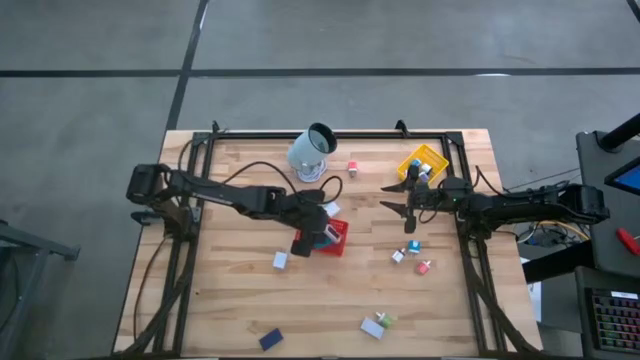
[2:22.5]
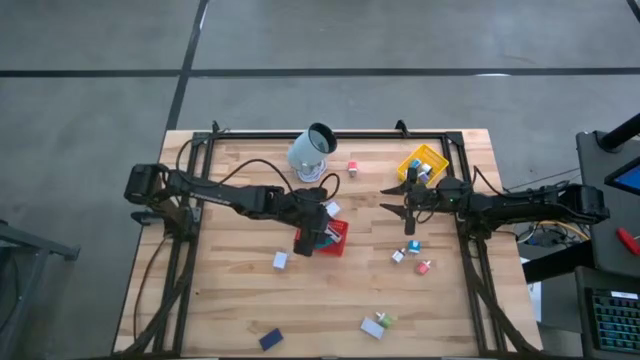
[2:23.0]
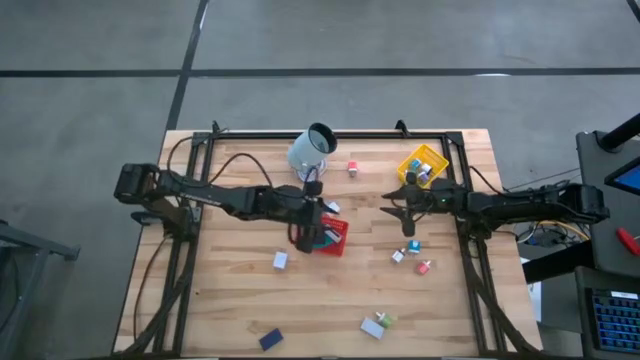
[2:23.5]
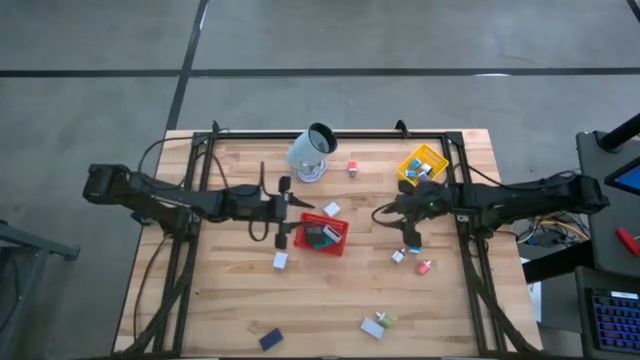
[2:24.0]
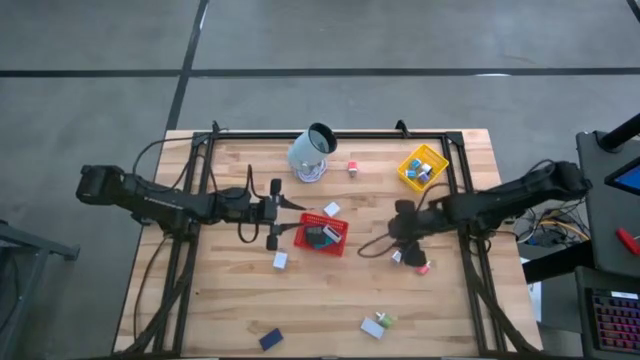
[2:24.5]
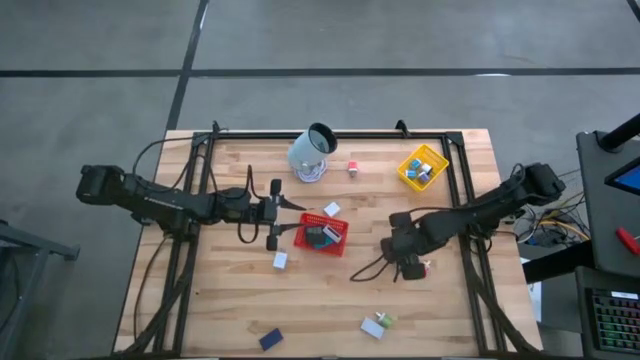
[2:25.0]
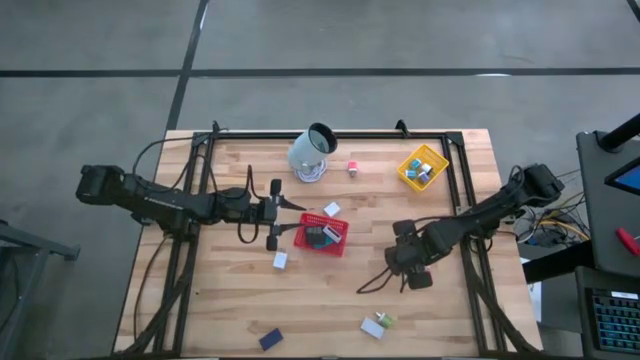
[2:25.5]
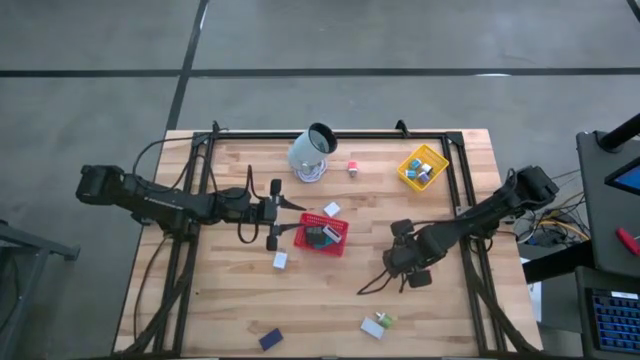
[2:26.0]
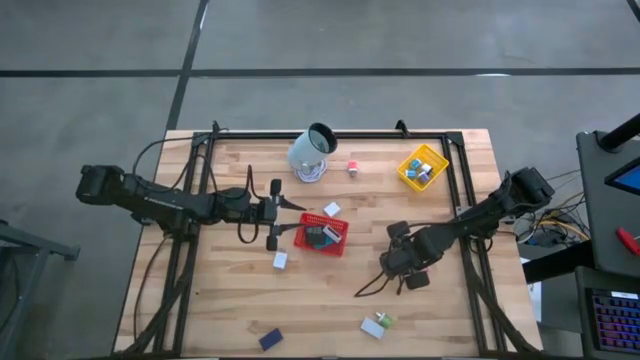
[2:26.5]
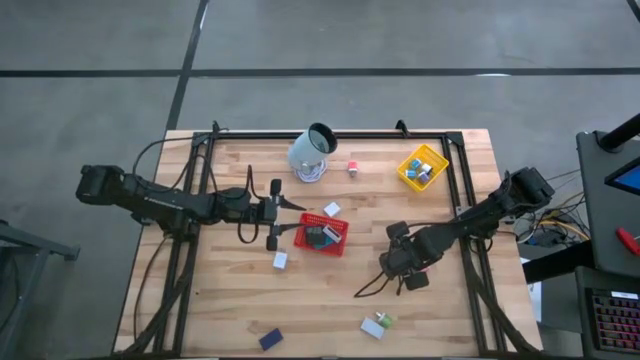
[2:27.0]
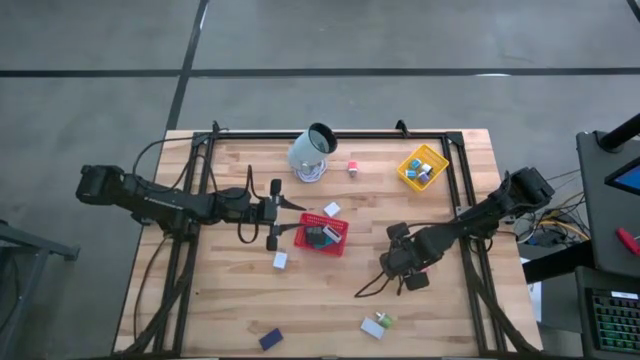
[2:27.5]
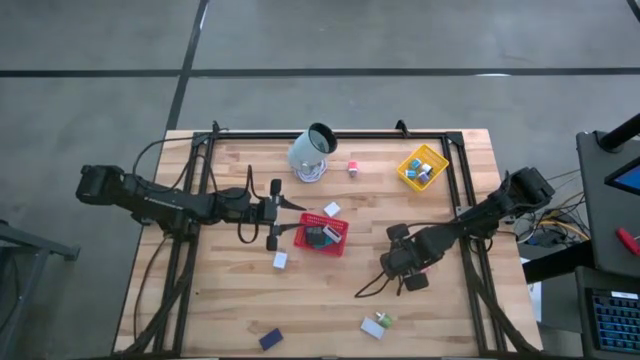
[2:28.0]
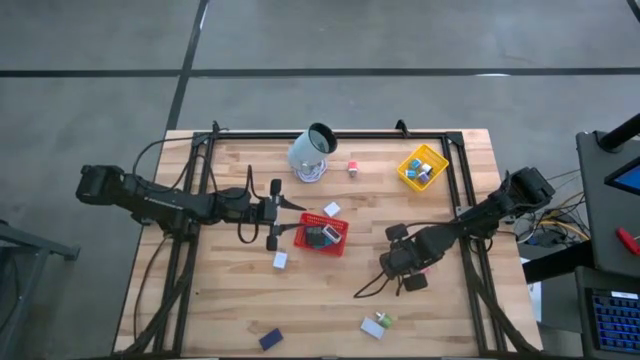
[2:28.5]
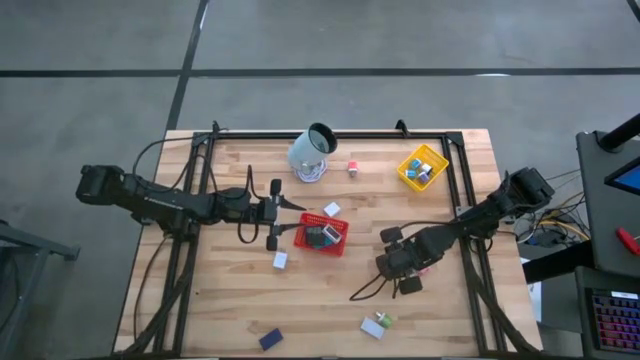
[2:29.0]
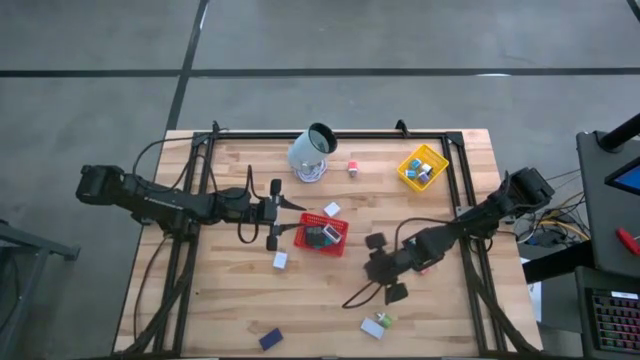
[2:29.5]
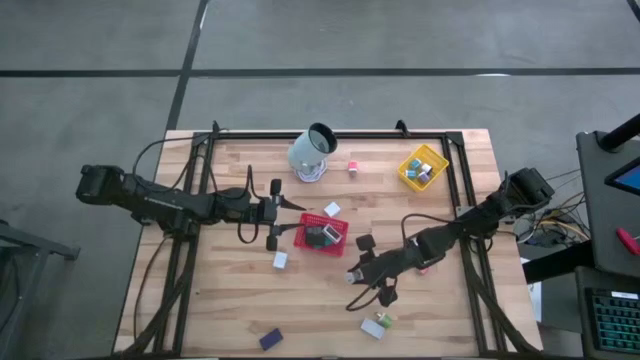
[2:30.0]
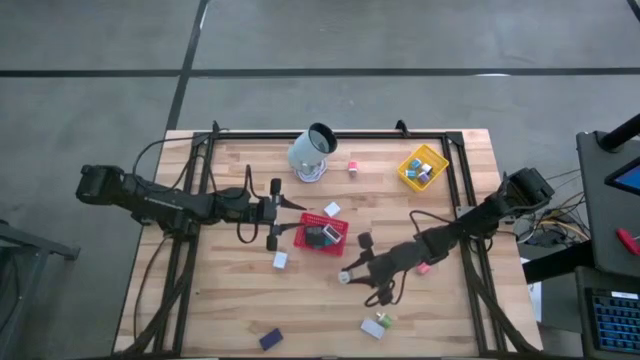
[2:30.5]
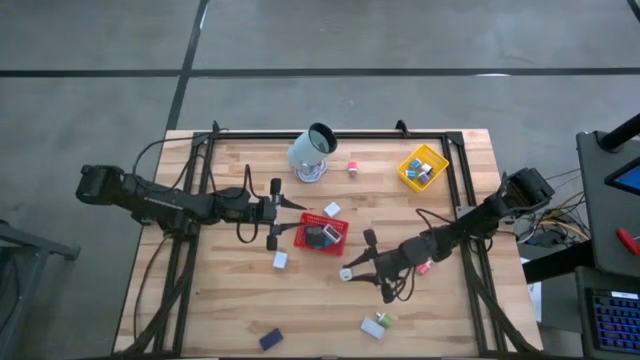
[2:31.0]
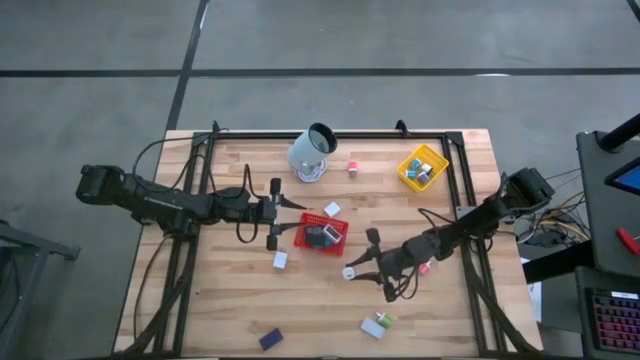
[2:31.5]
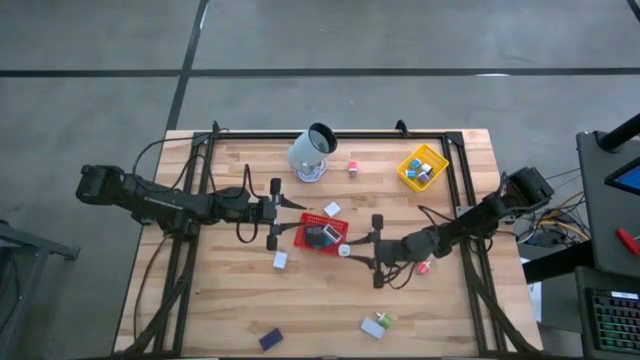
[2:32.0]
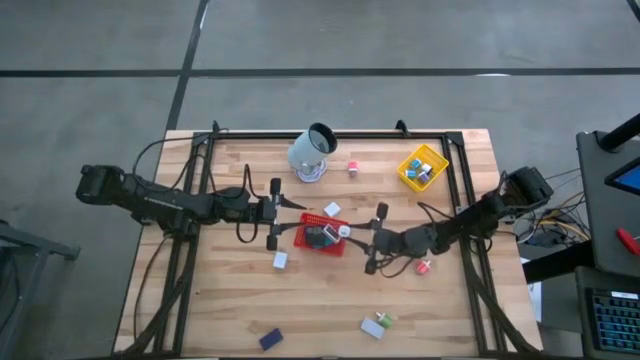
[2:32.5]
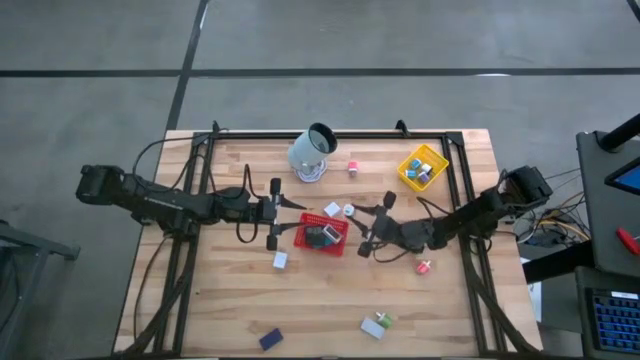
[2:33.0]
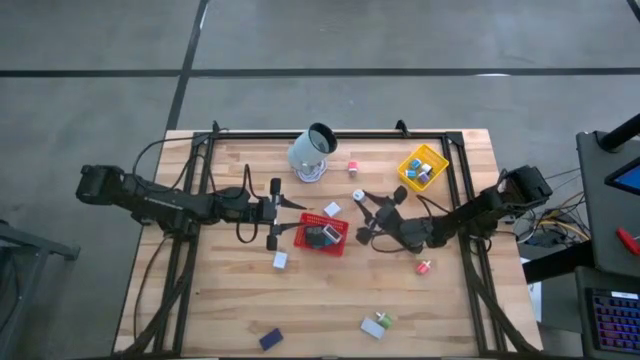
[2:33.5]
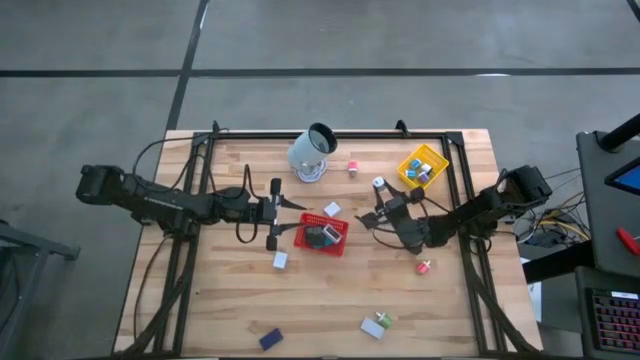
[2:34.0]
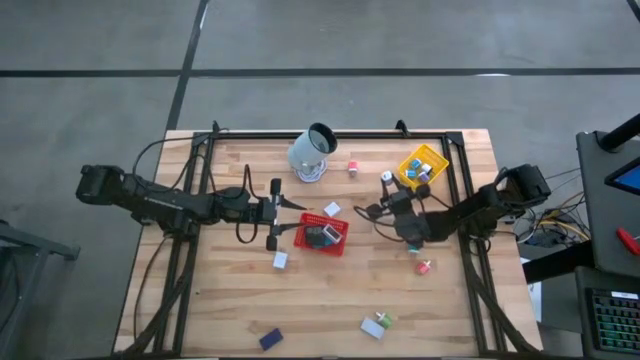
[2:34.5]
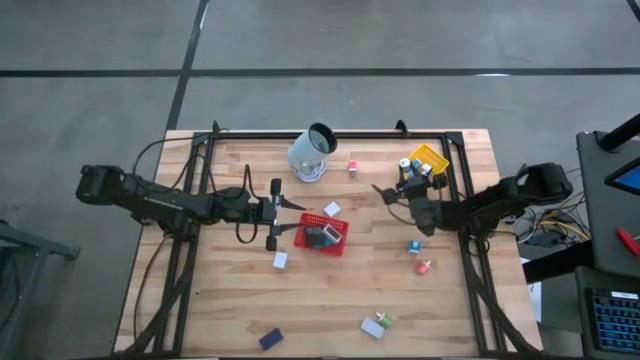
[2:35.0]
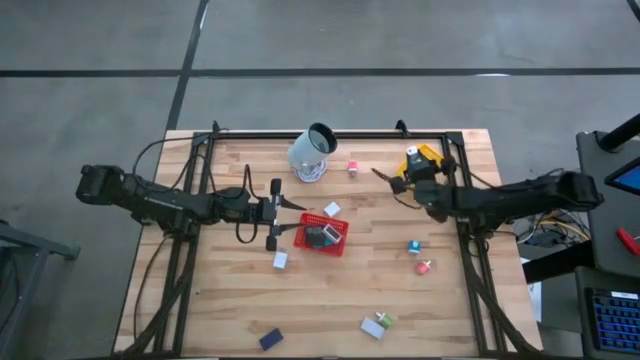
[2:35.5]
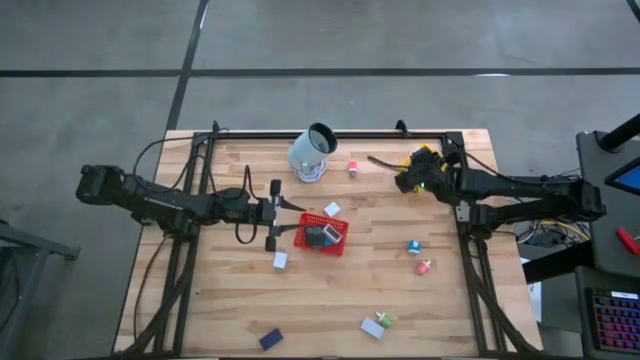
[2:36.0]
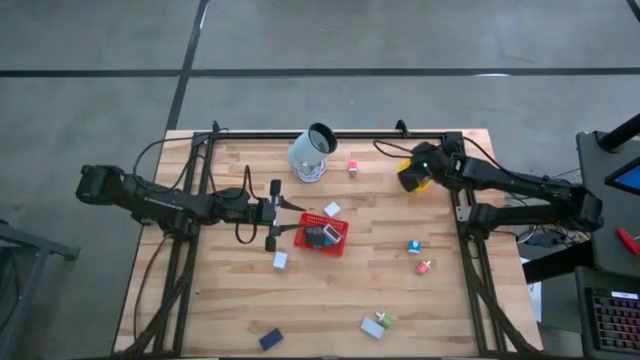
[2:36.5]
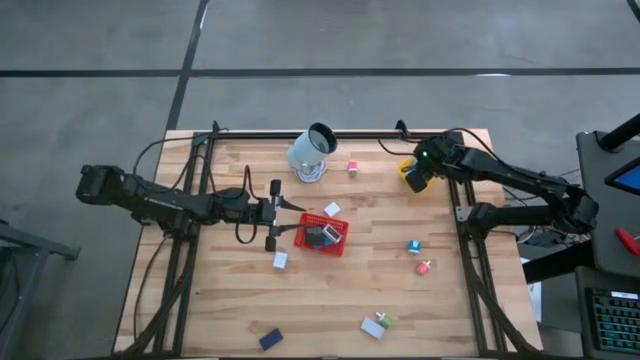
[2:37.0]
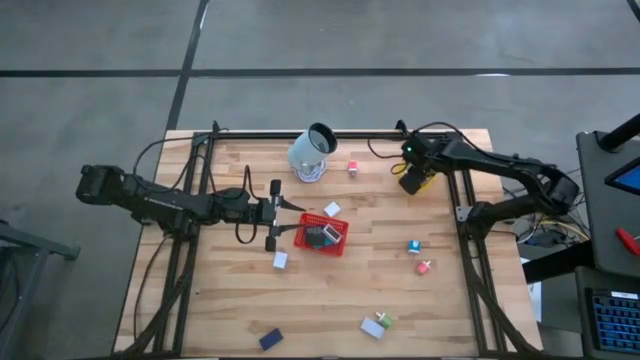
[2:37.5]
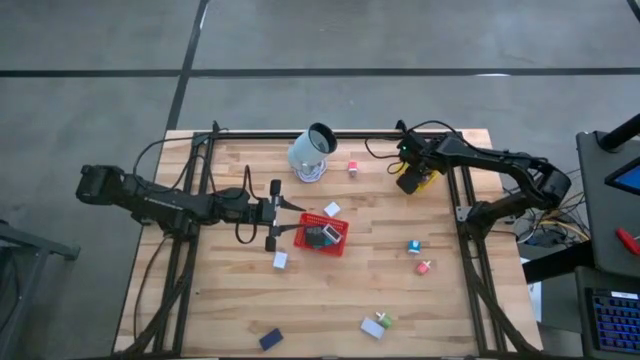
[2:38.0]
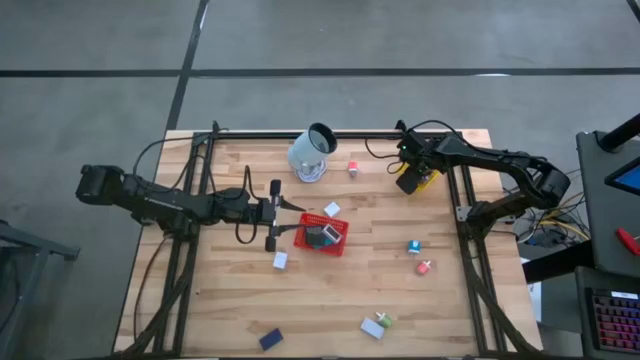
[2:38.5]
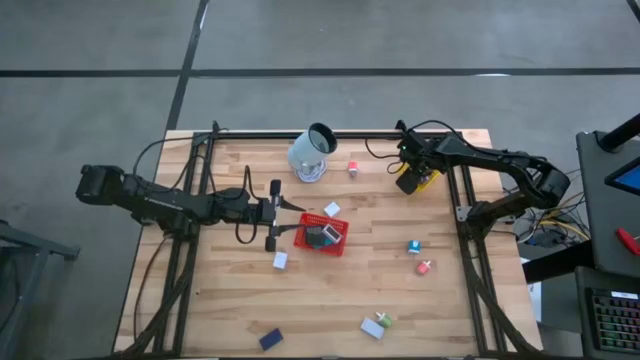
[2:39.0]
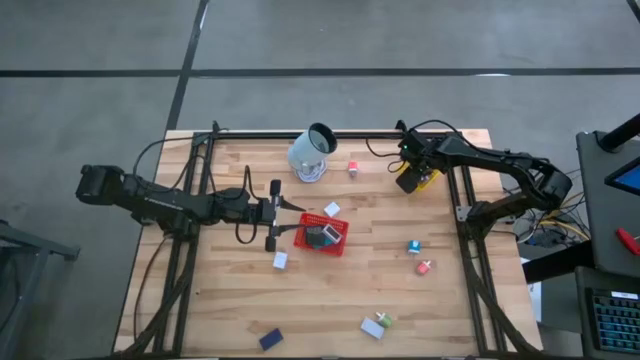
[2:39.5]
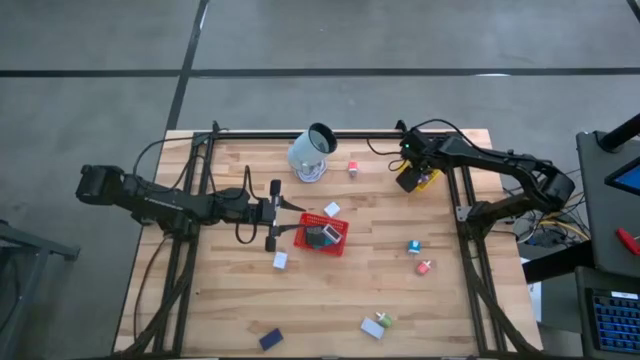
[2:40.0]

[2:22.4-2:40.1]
Task: Pick & Place Office items
Put the white black charger adapter into the yellow basket

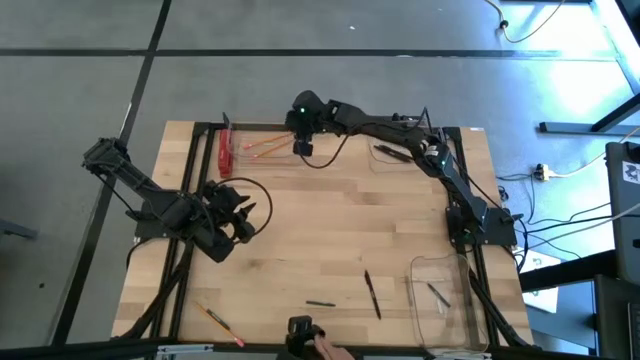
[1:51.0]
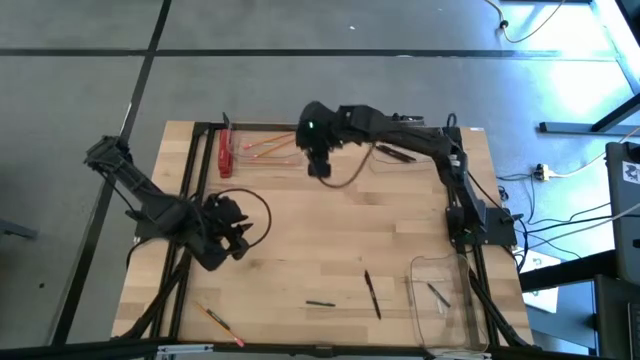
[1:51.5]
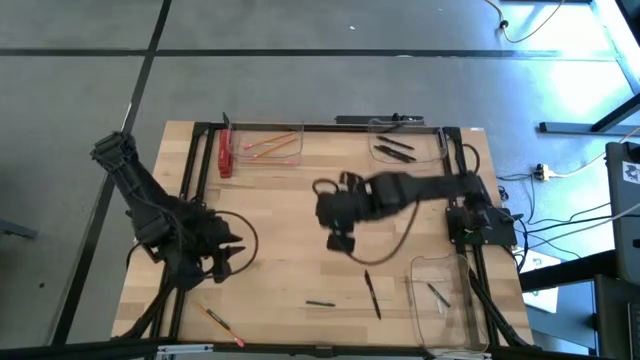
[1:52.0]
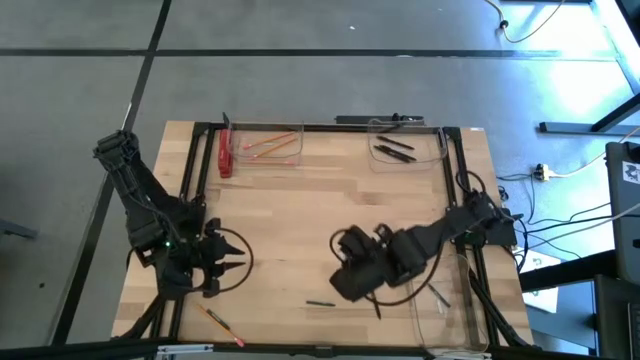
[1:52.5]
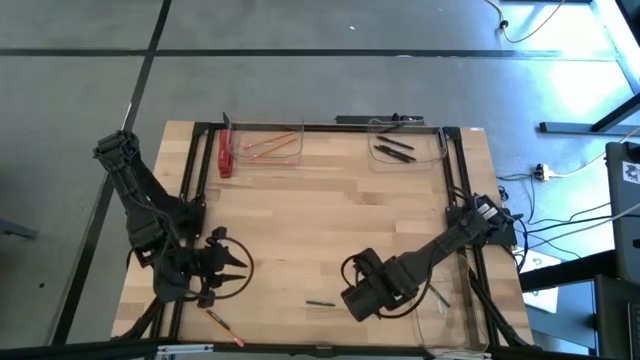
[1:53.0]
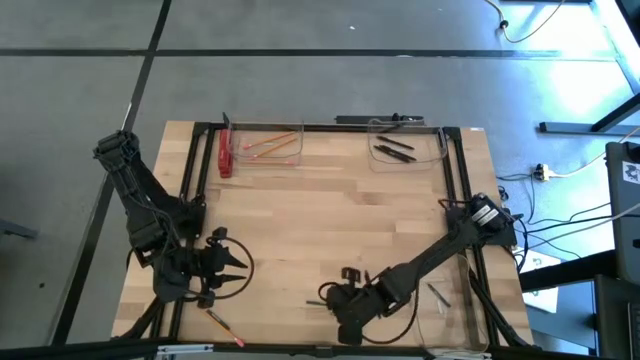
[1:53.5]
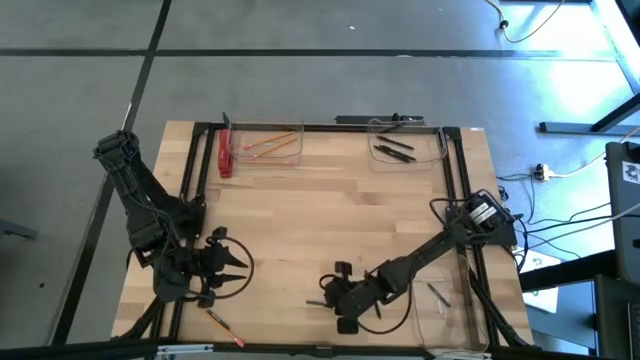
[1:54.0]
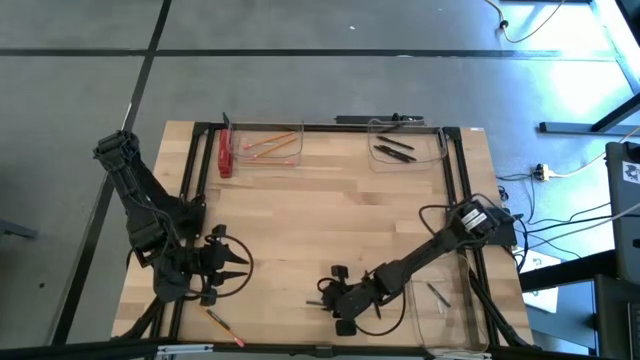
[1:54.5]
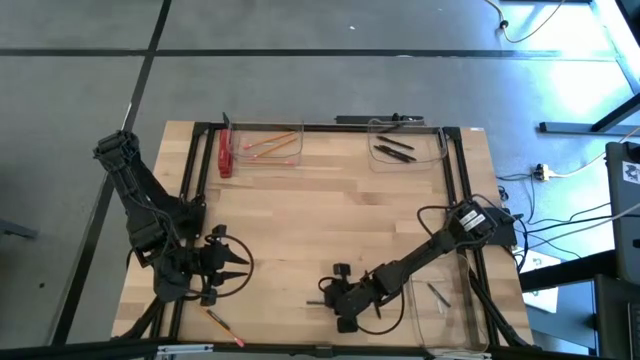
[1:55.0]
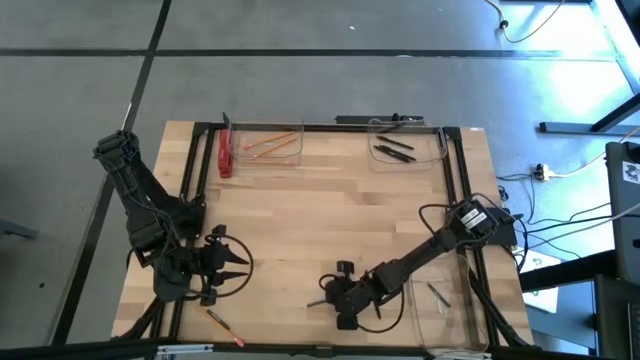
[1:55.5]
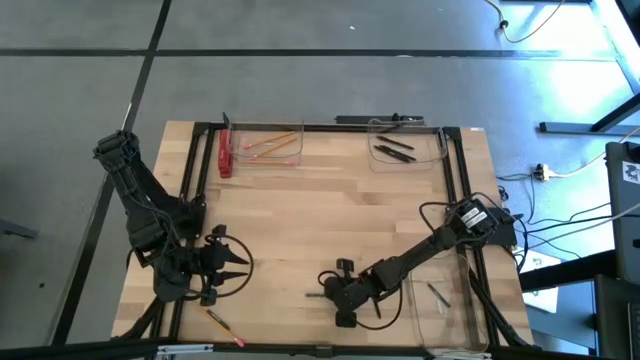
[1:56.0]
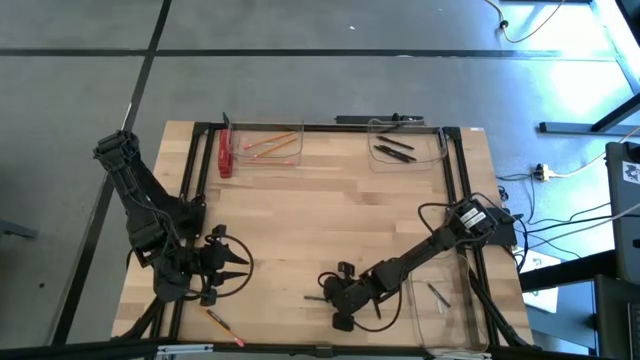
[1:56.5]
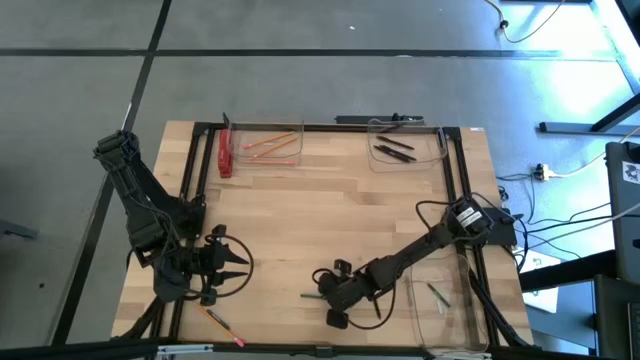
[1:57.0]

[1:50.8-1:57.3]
Task: Sort crayons/erasers/pens/pencils in bins
Put the green crayon into the bottom transparent bin
